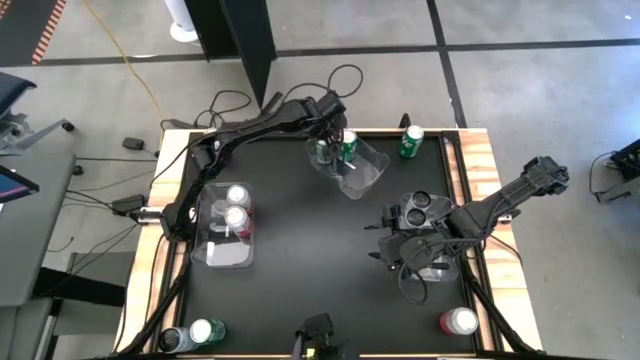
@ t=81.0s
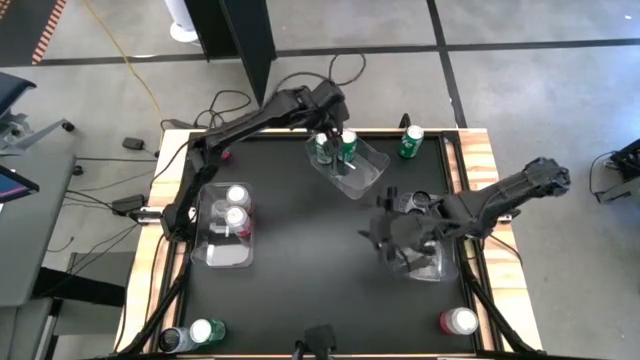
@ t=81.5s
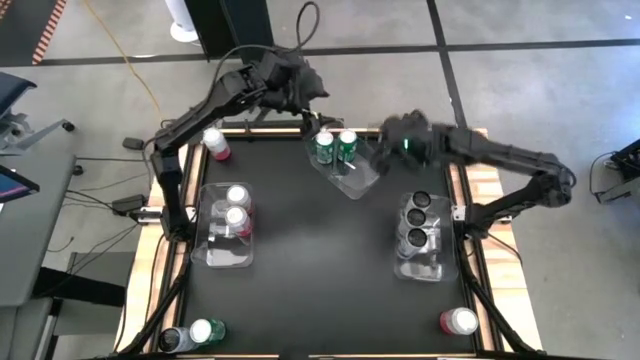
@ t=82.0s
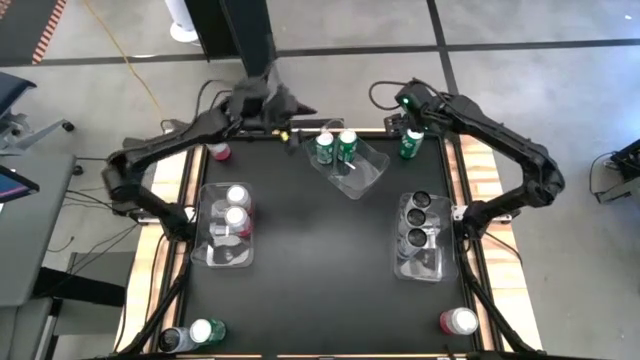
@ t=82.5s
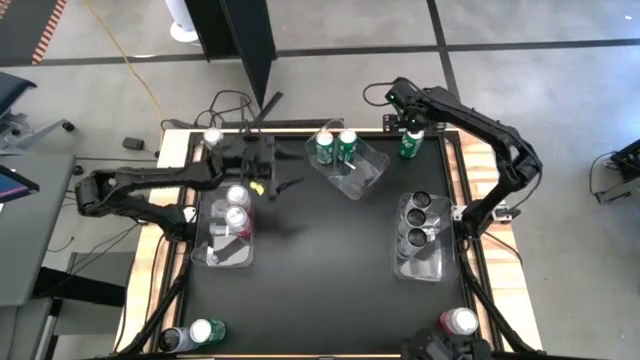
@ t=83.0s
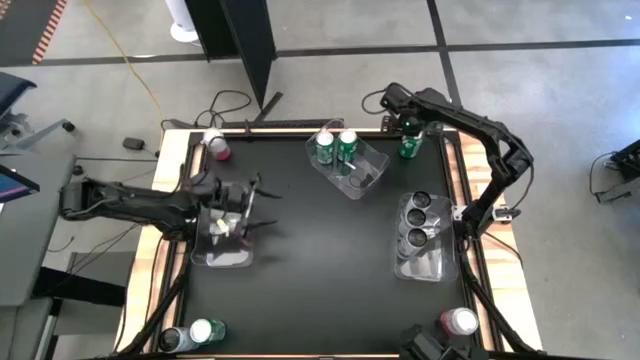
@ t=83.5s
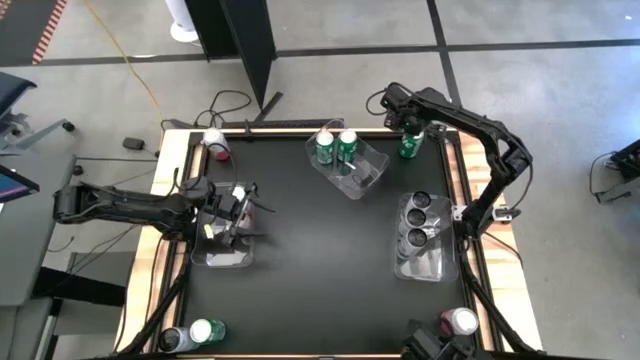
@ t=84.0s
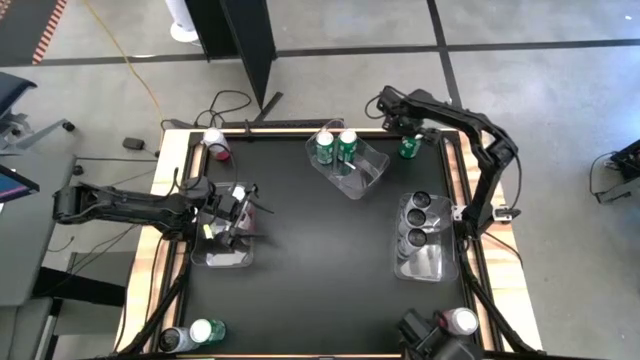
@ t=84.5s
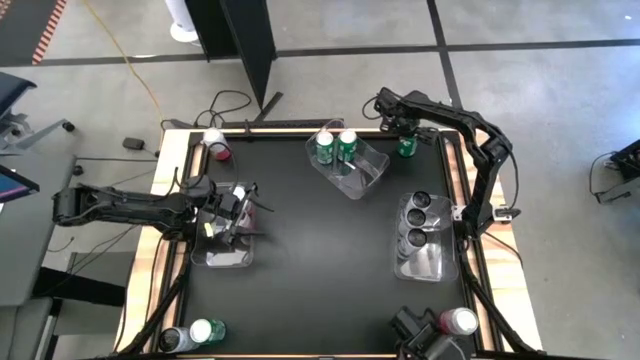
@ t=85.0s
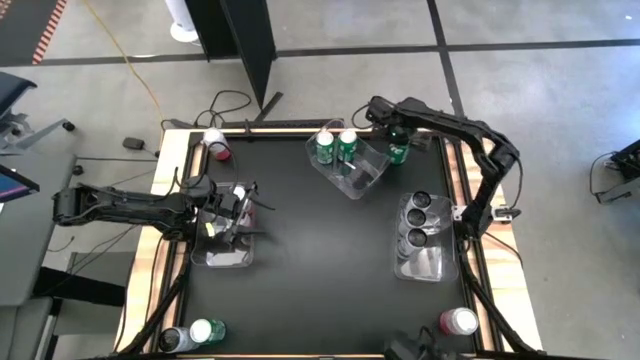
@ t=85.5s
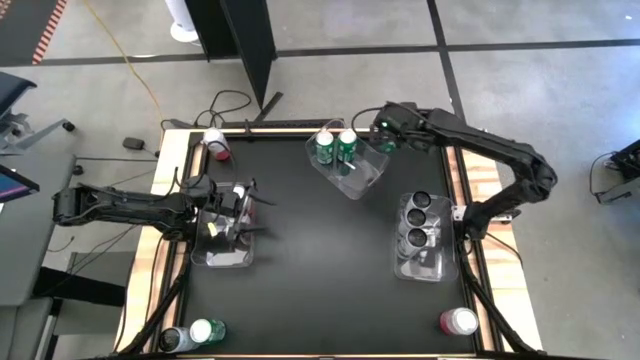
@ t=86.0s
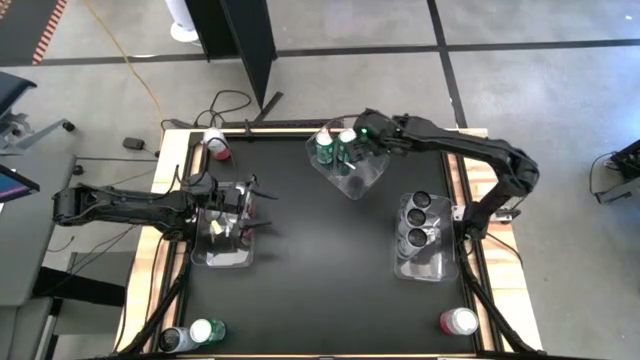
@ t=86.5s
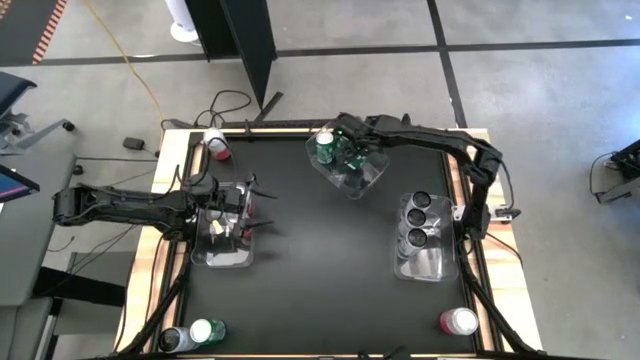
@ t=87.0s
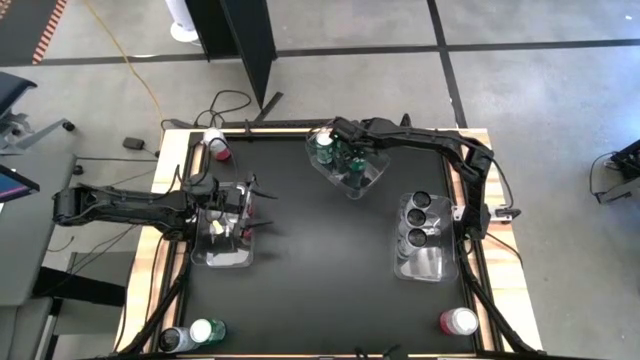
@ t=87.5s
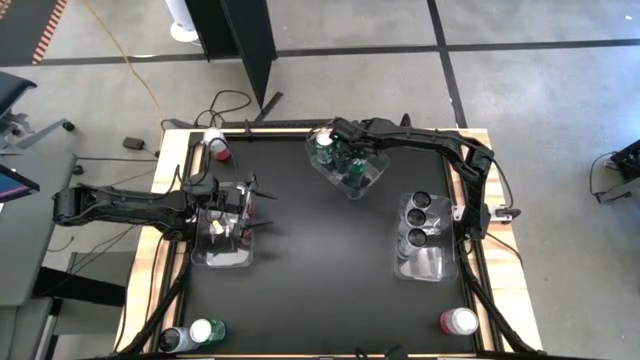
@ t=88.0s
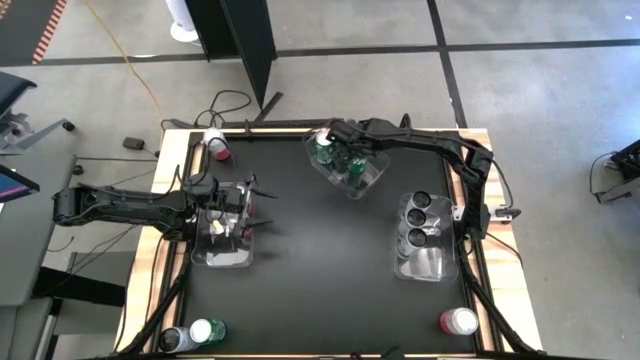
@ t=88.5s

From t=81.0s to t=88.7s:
Task: Sort soda cans
Put the top green soda can into the middle transparent bin

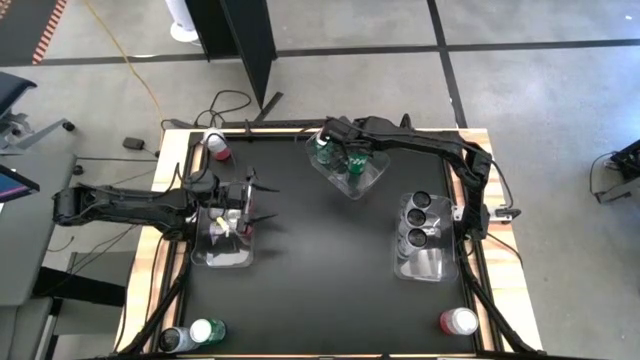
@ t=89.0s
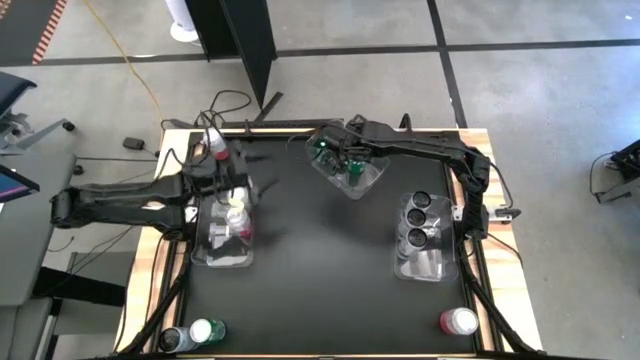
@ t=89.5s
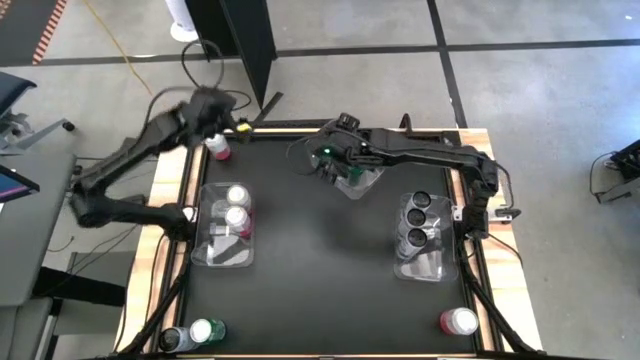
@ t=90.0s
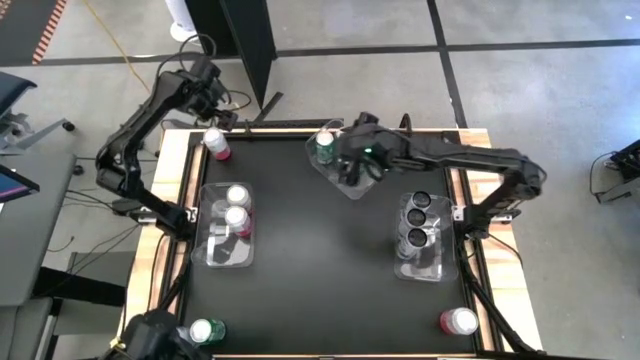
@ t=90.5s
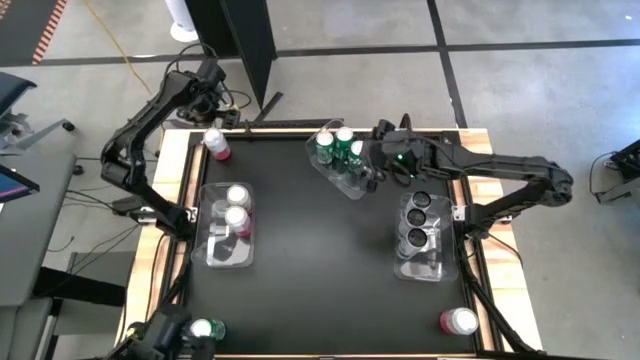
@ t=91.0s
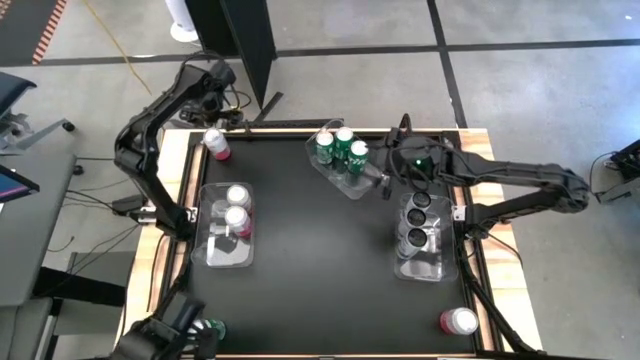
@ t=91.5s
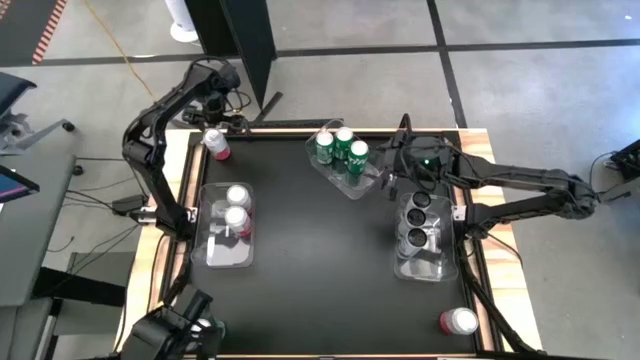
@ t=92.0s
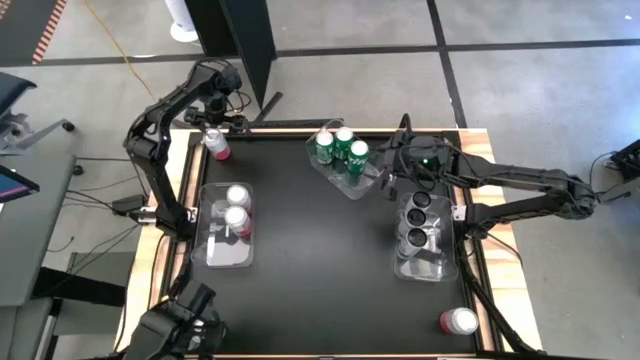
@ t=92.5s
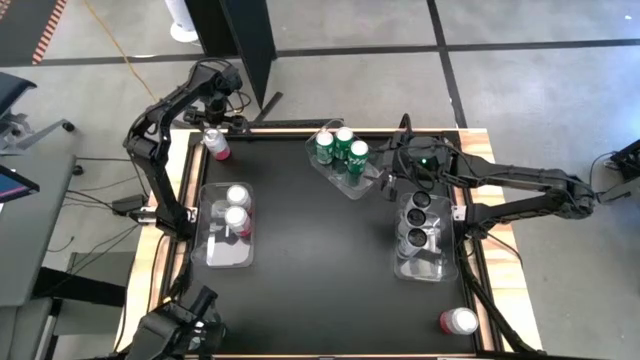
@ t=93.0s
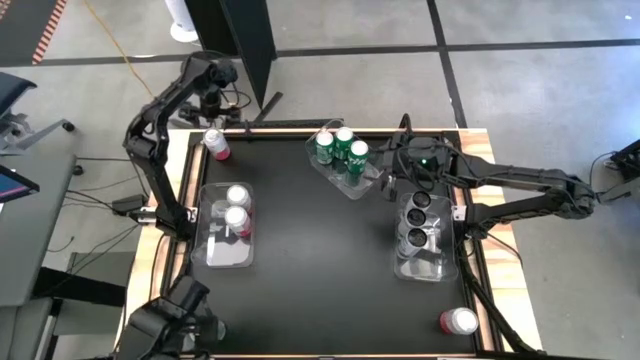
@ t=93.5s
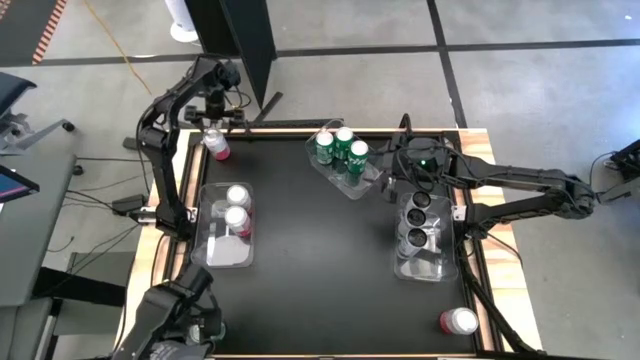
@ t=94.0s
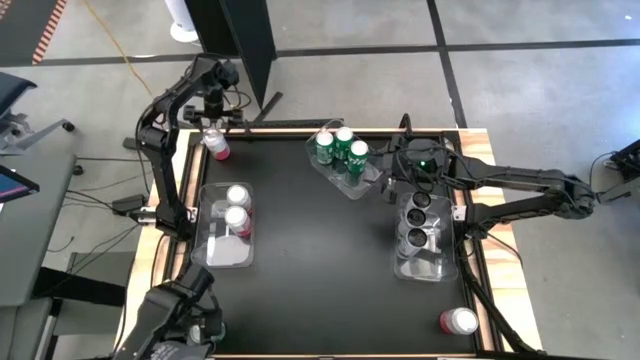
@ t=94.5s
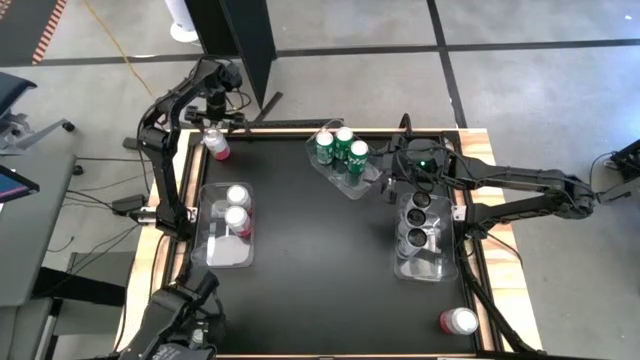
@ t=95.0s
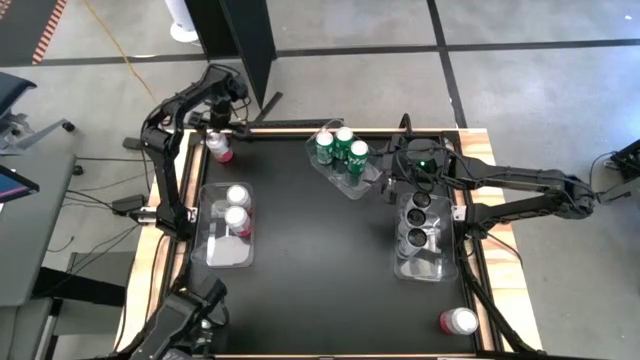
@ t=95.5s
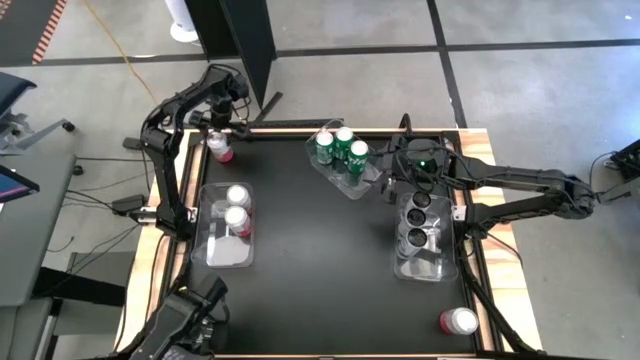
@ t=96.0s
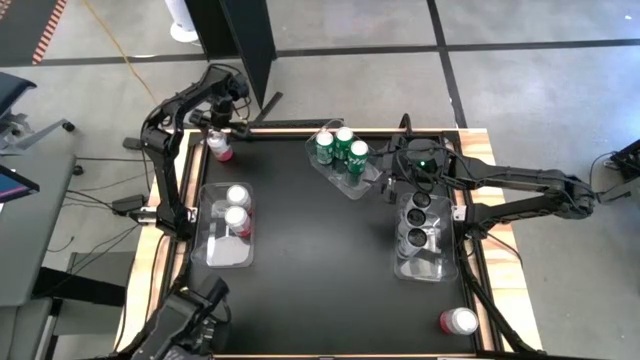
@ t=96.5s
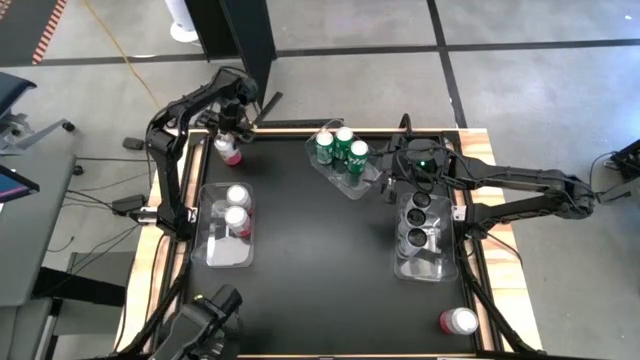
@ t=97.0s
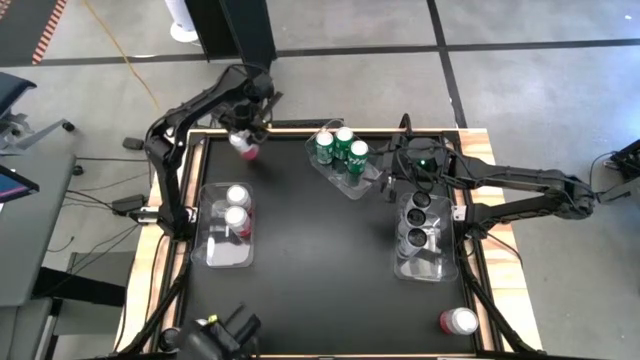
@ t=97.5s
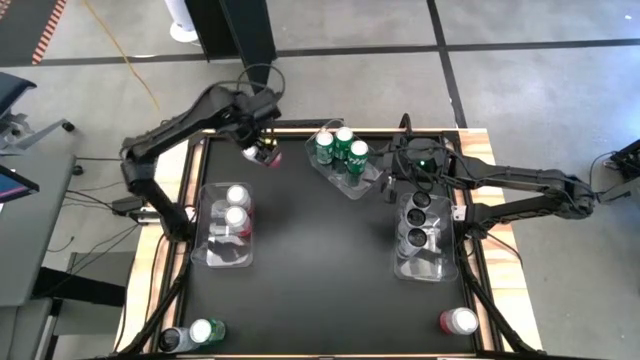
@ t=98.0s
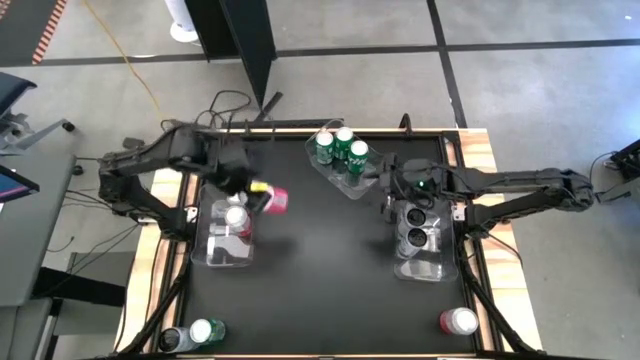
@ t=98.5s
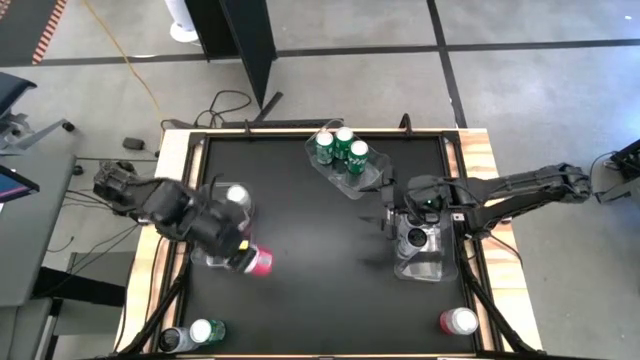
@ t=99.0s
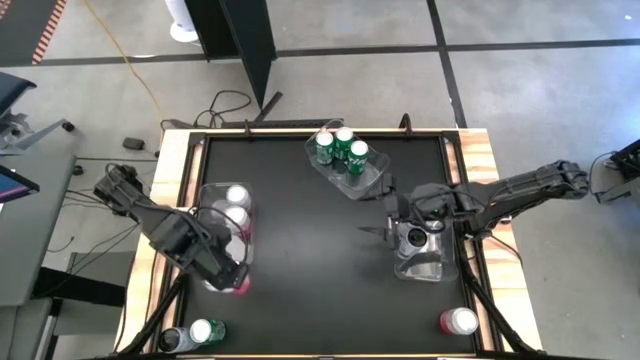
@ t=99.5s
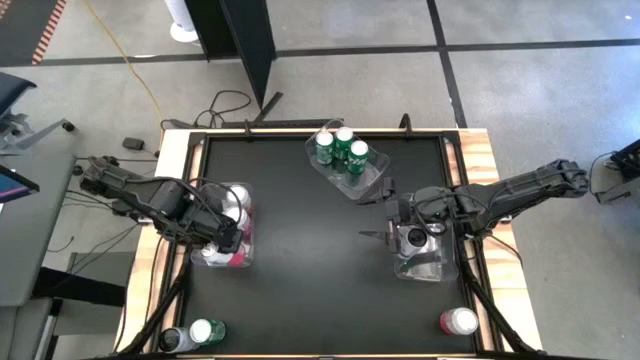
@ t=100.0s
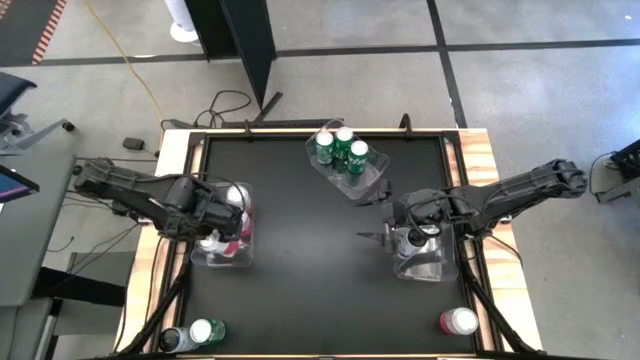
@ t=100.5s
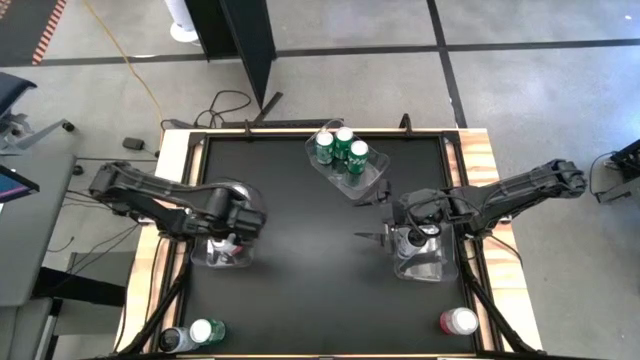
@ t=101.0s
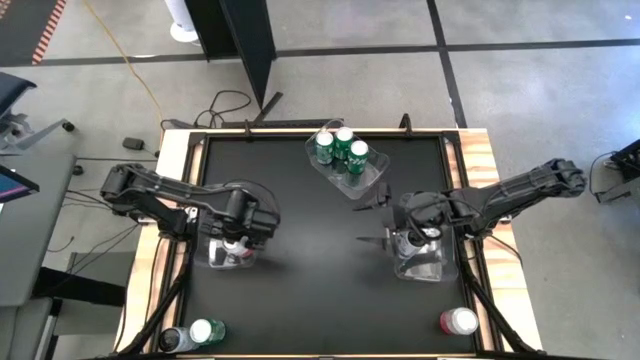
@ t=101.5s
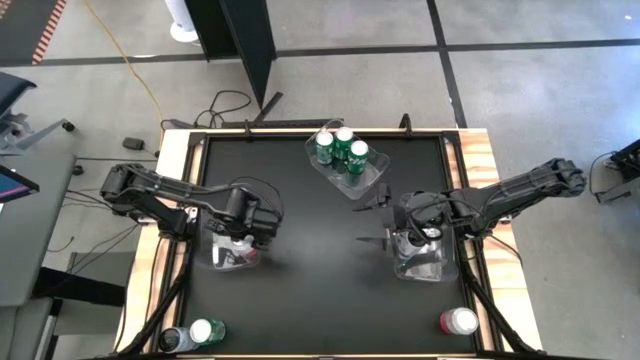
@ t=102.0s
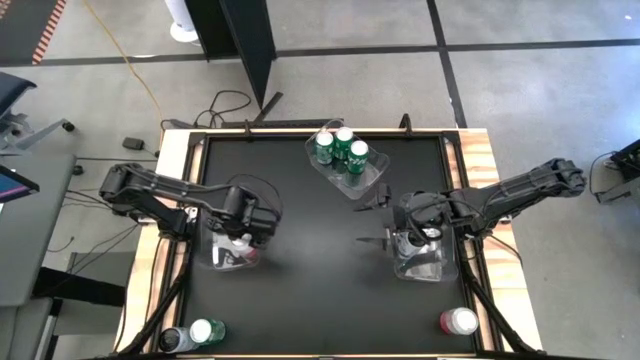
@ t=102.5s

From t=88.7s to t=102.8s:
Put the top pink white soda can into the left transparent bin
